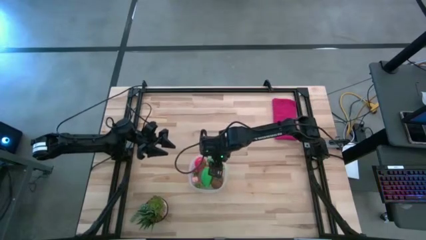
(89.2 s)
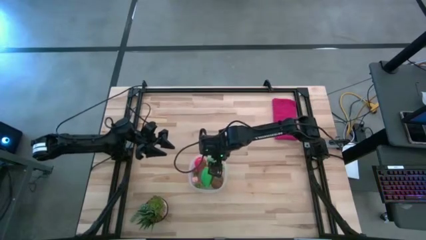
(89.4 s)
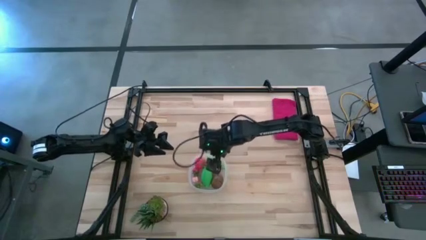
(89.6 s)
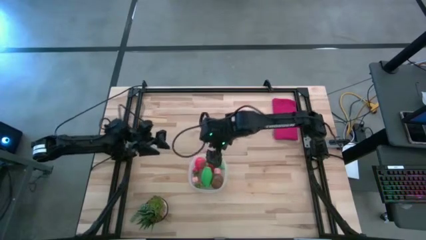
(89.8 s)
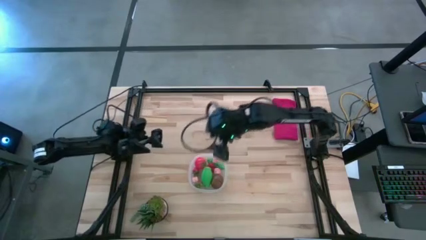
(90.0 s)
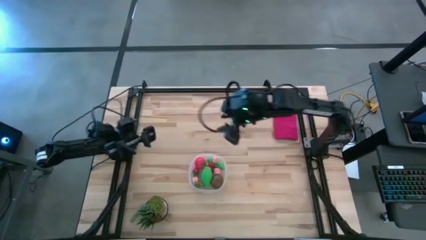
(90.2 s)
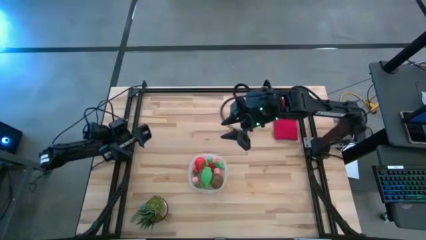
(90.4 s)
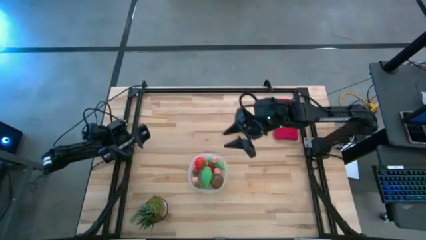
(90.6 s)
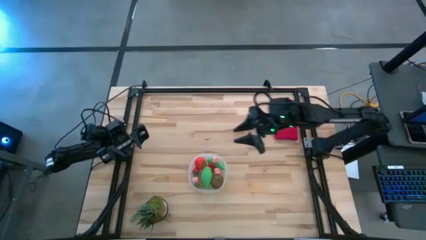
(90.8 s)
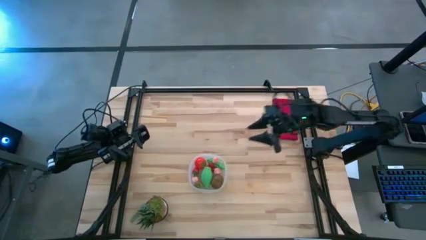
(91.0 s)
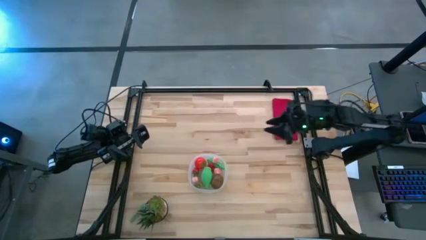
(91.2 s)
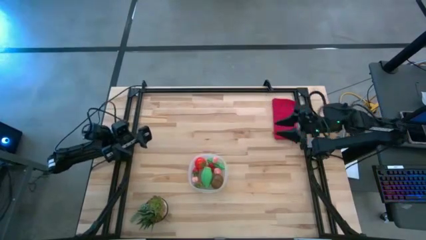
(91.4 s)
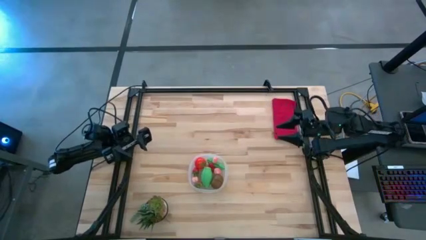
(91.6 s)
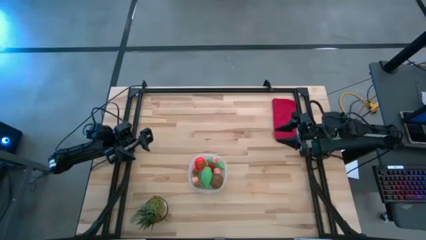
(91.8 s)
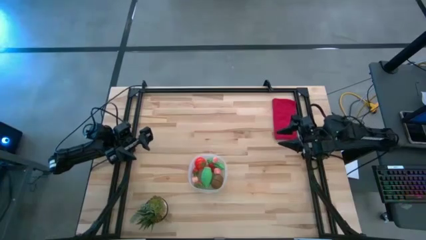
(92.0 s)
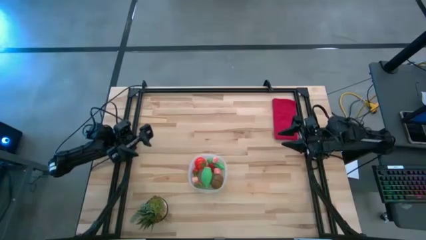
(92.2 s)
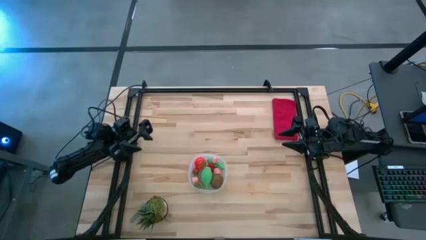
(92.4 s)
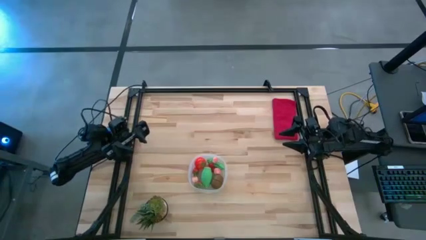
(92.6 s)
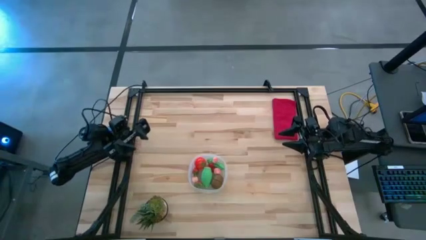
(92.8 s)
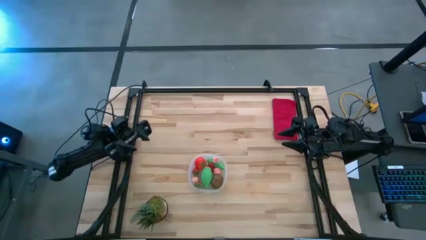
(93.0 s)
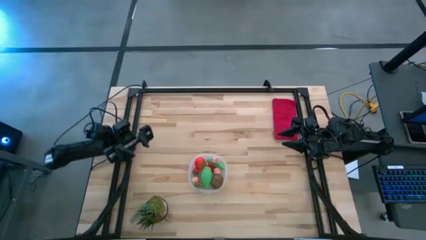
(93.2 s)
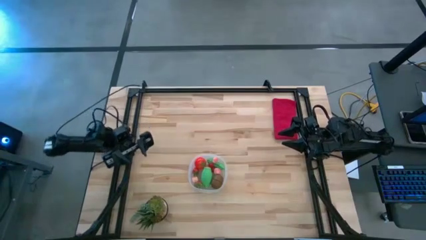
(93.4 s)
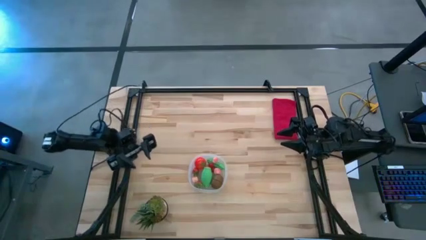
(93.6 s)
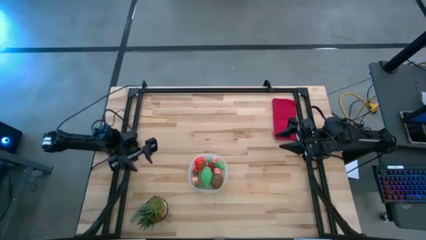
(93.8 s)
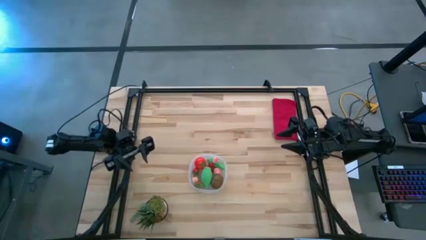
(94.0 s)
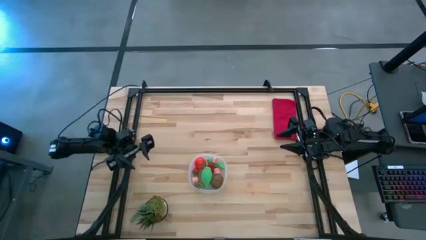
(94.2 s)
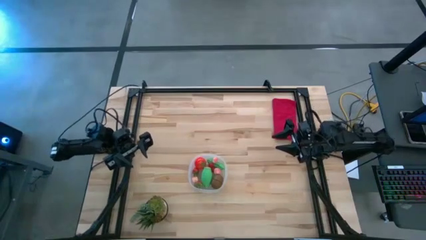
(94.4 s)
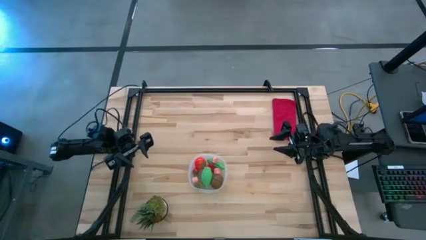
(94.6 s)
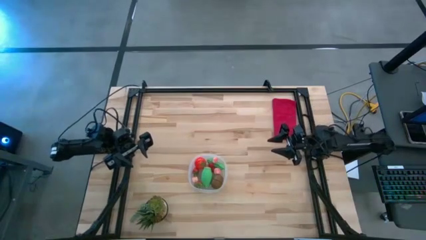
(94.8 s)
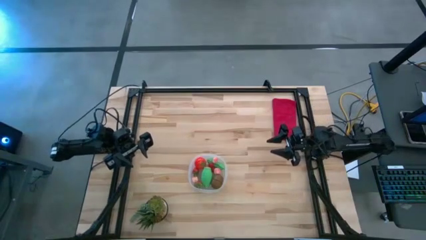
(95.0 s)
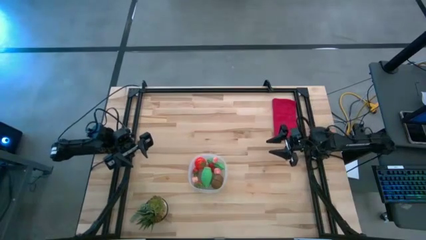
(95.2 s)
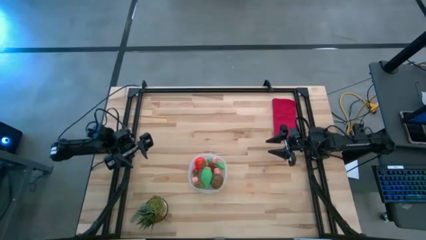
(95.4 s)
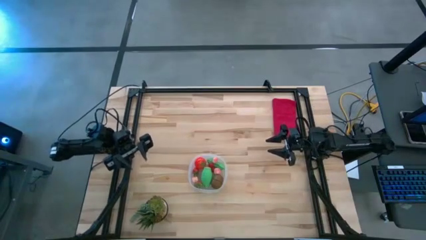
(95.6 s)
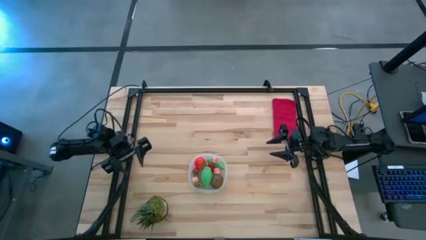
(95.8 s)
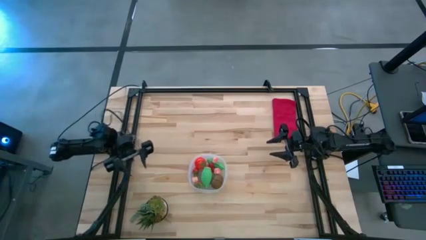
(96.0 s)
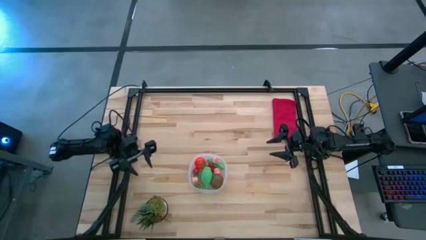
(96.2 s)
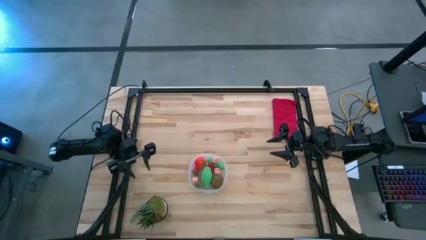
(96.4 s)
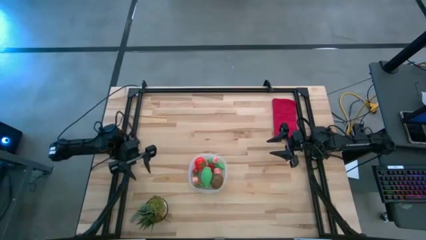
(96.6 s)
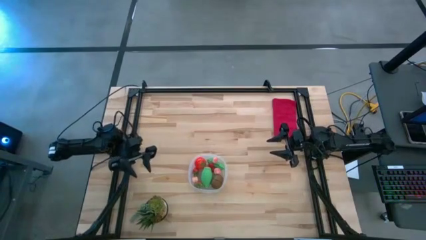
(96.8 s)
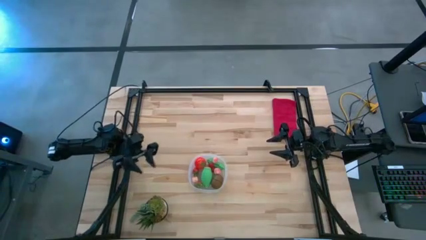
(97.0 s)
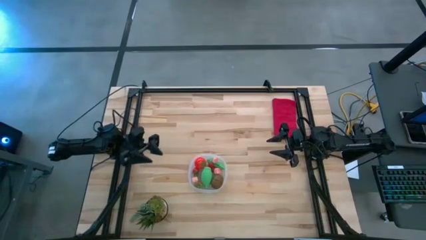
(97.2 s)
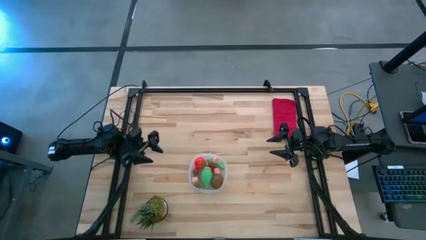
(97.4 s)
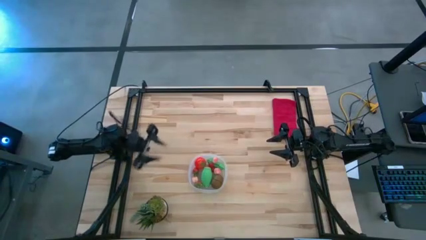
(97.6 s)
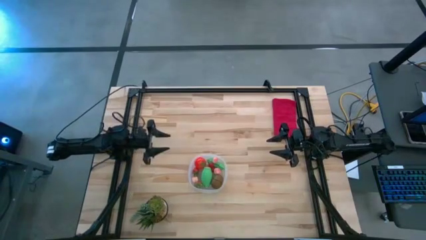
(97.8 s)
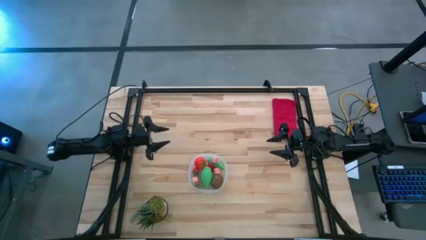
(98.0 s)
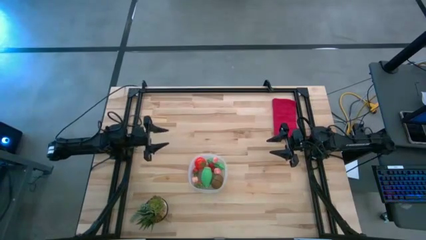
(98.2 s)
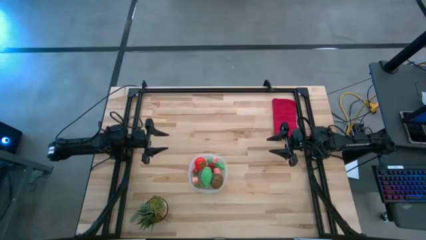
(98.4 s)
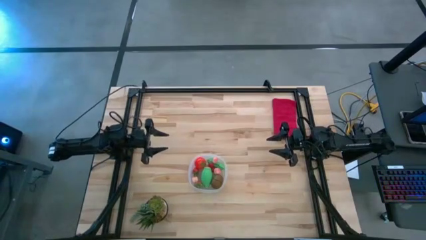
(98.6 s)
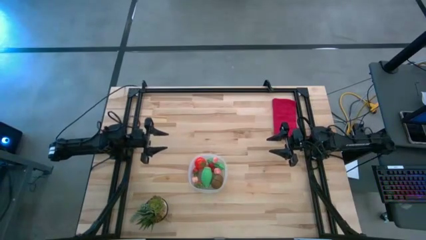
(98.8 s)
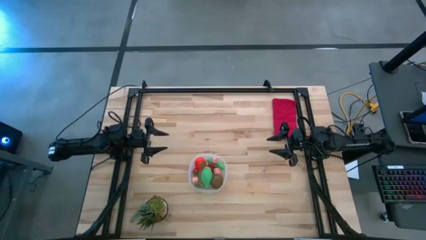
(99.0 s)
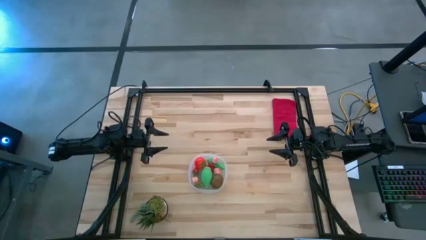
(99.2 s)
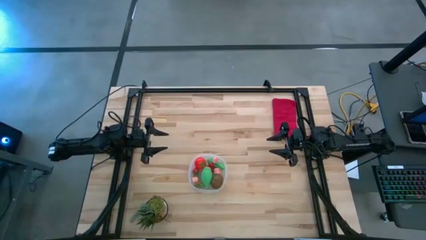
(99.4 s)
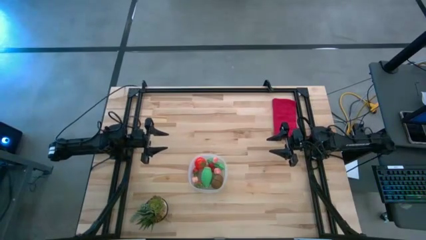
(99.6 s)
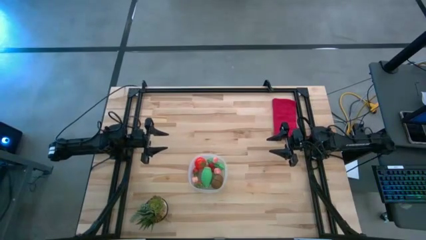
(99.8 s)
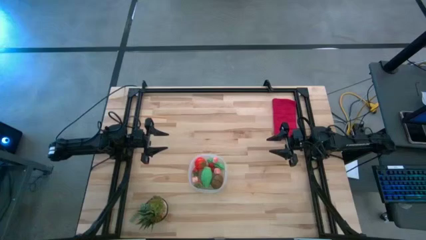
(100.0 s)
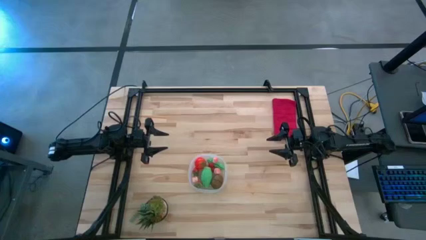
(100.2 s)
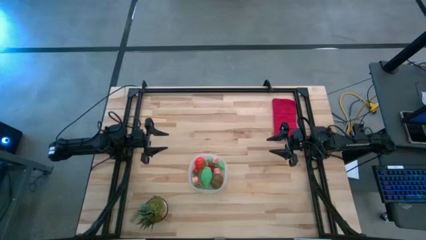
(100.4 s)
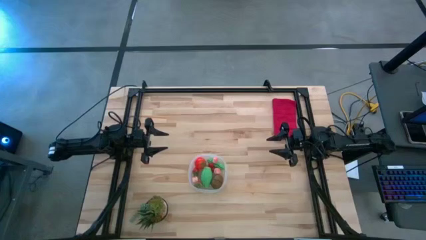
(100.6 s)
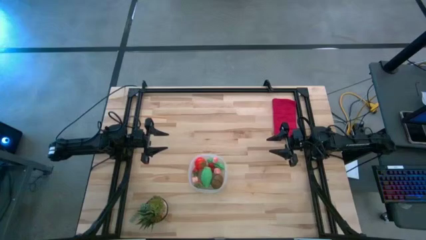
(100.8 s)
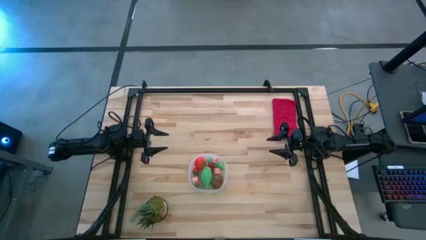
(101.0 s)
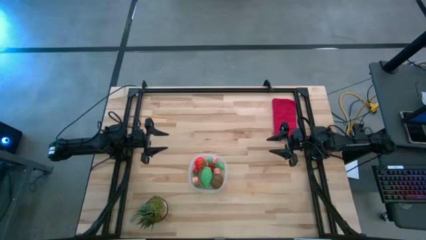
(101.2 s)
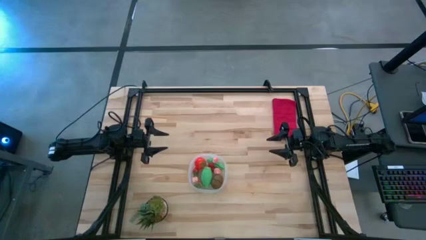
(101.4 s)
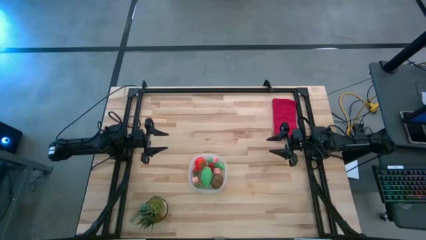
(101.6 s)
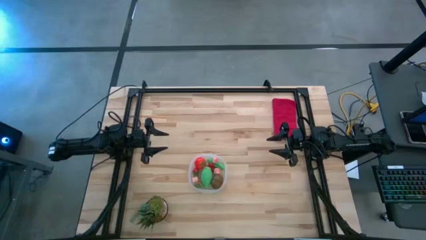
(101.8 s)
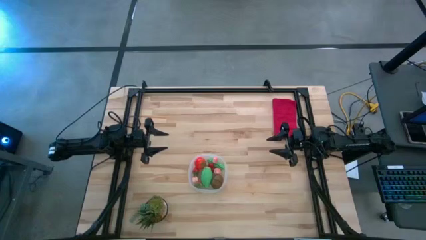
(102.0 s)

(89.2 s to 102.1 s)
Task: Pick and placing Produce into tupperware
Return to Home Position

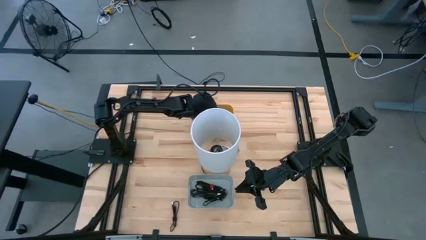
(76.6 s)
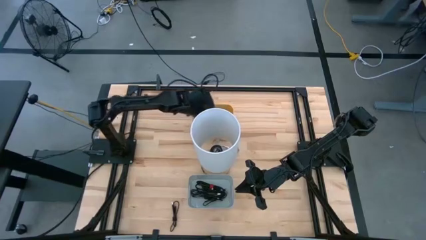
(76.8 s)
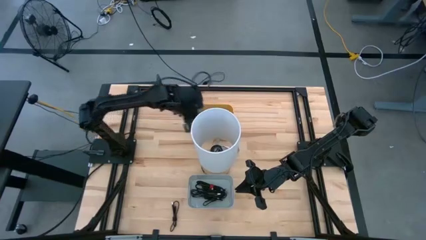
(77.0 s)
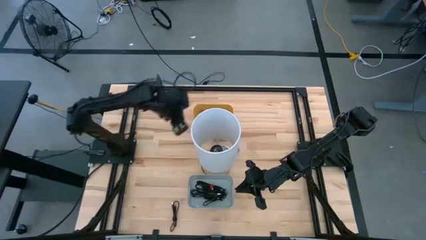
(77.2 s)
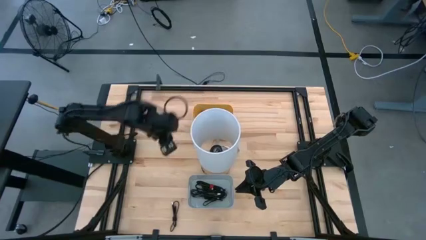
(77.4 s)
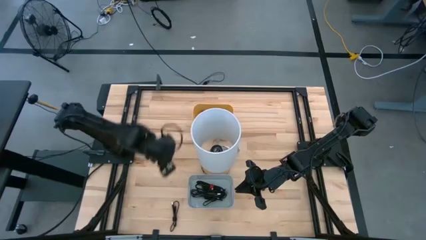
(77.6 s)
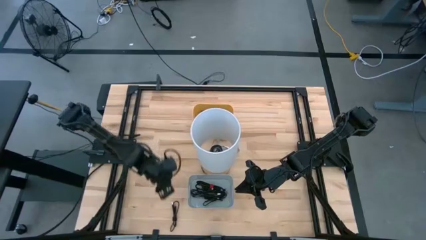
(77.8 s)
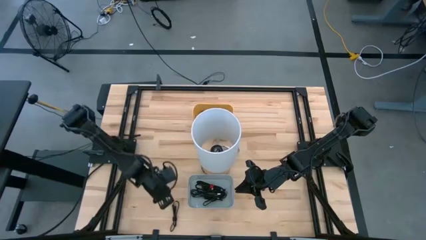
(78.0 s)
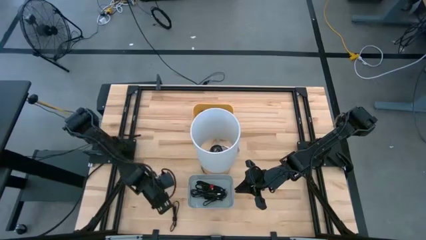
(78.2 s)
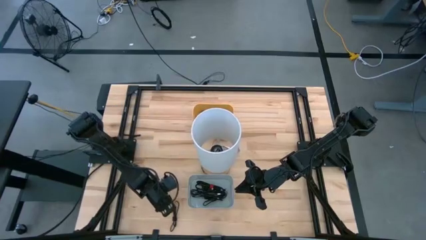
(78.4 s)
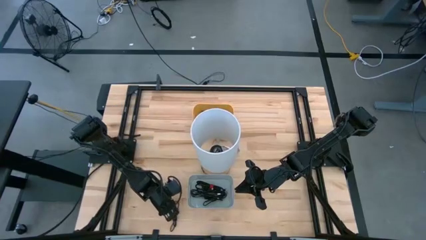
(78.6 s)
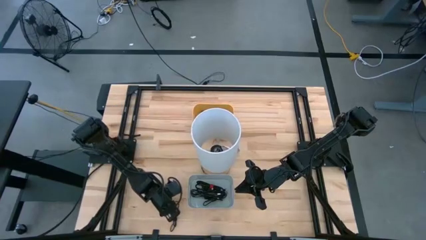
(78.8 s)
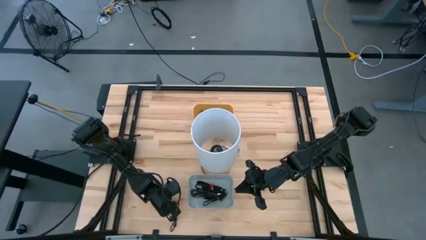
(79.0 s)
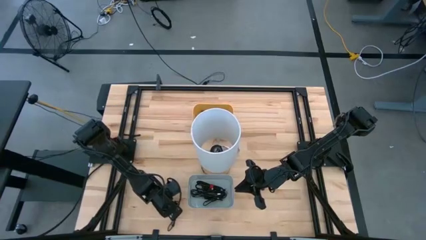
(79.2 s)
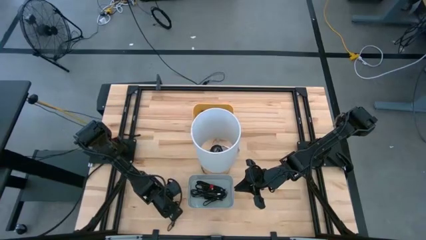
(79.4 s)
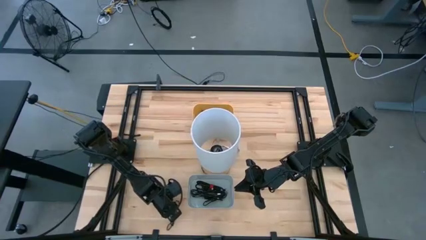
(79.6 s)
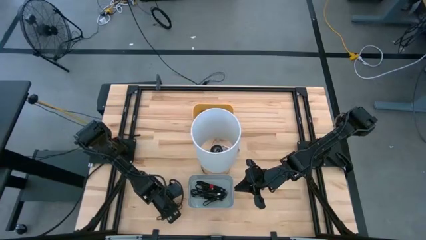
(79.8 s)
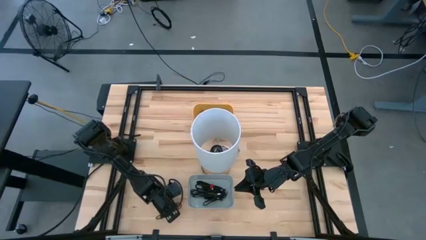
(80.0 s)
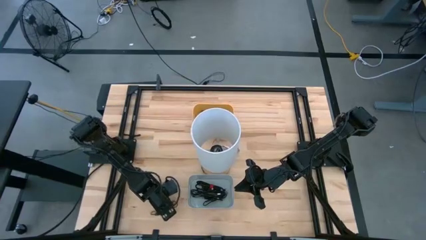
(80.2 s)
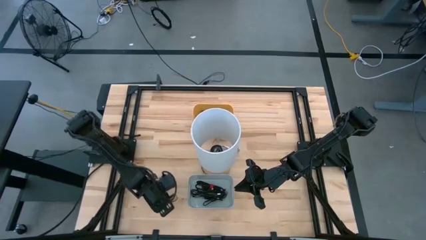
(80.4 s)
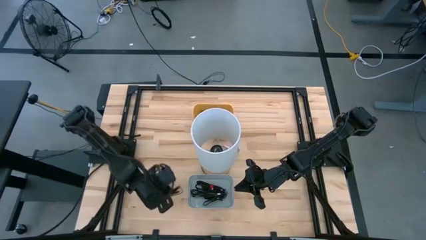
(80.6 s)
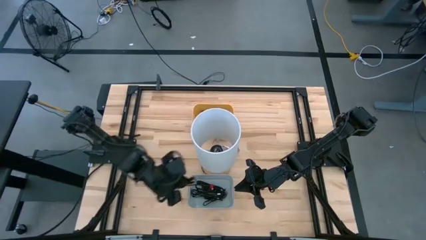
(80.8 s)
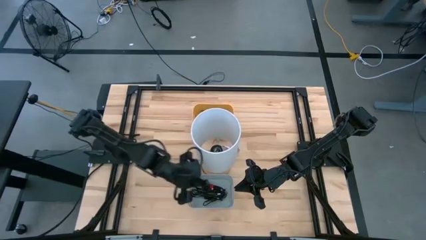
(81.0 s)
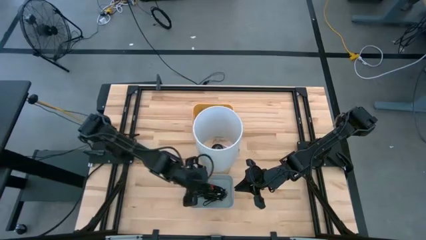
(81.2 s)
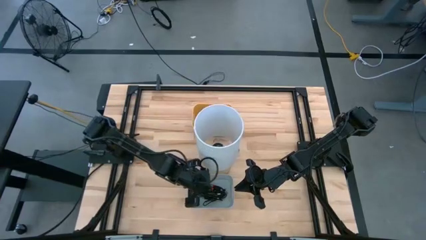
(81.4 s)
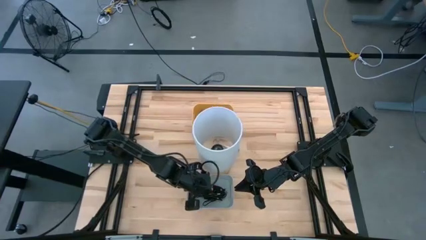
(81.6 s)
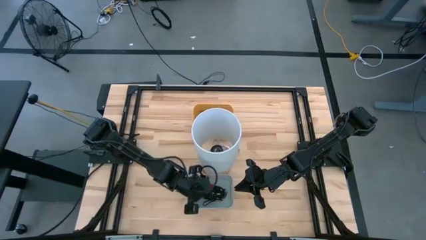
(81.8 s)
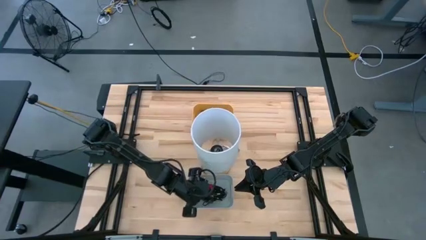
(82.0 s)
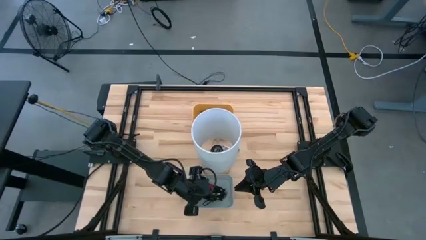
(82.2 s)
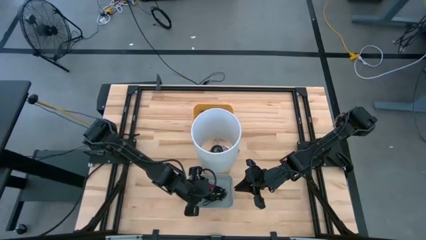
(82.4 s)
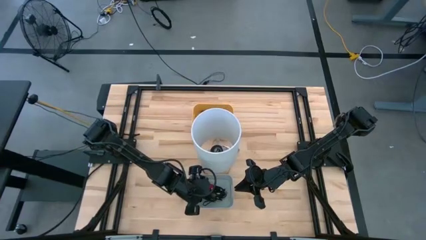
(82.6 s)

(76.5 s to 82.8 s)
Task: Pick & Place USB Port
Put the black charger cable into the white bin
